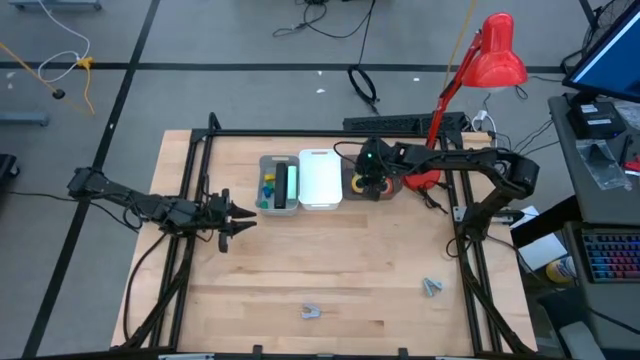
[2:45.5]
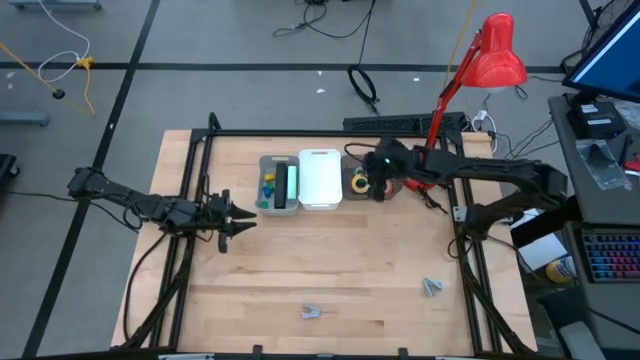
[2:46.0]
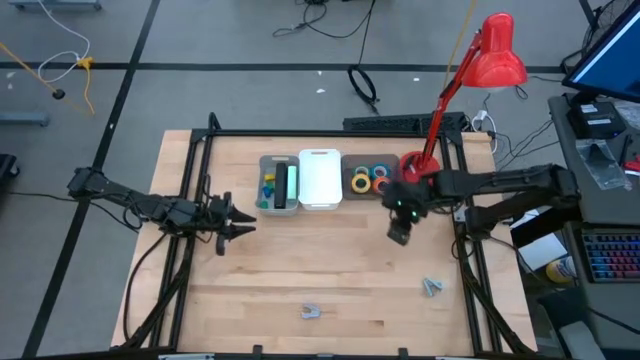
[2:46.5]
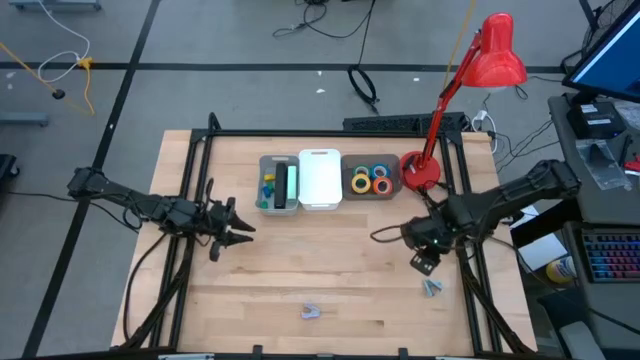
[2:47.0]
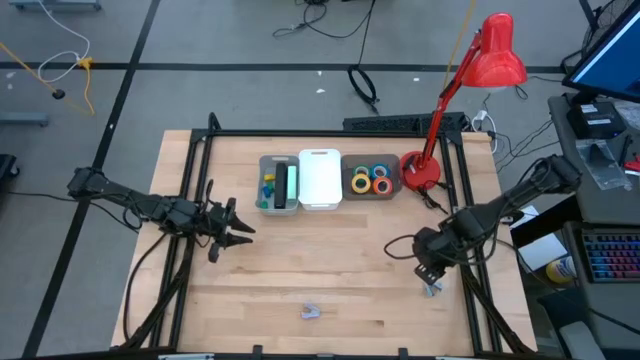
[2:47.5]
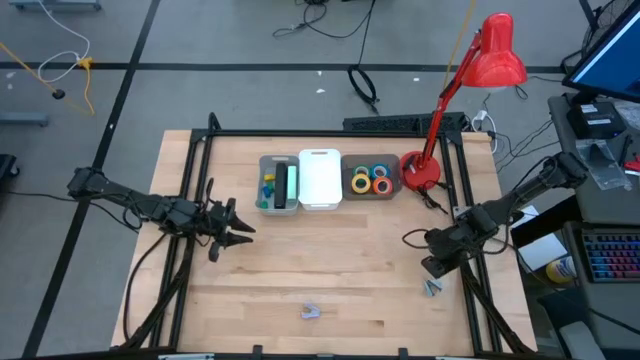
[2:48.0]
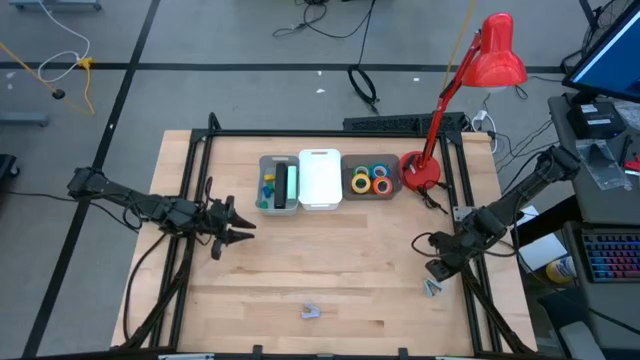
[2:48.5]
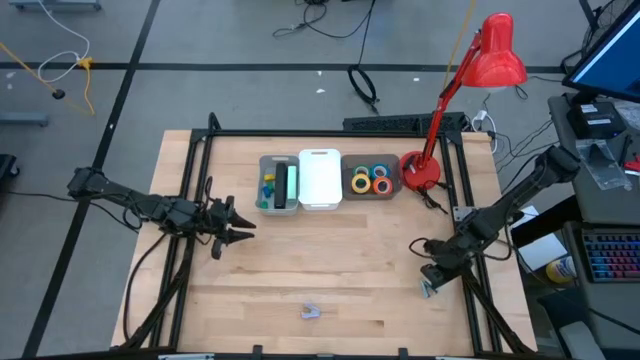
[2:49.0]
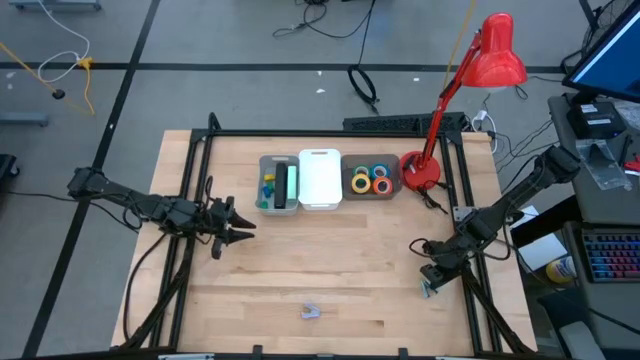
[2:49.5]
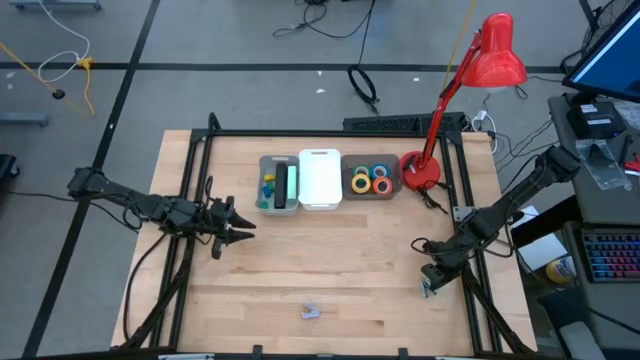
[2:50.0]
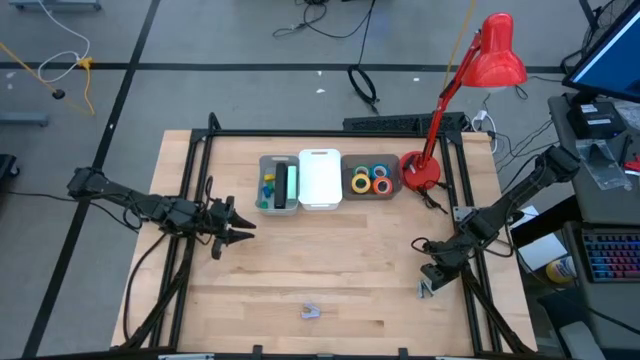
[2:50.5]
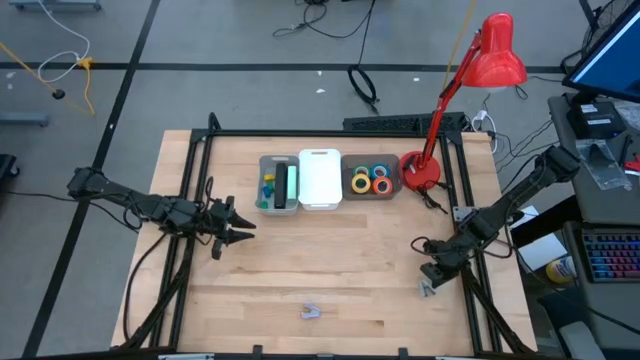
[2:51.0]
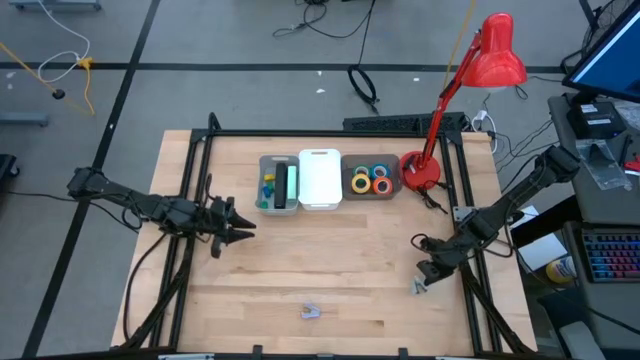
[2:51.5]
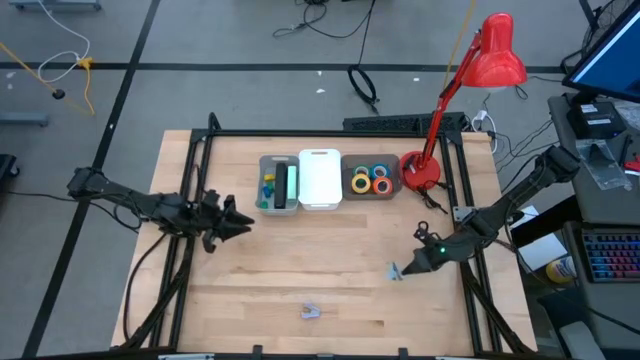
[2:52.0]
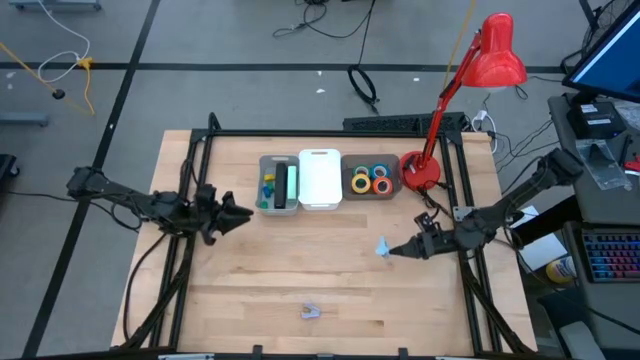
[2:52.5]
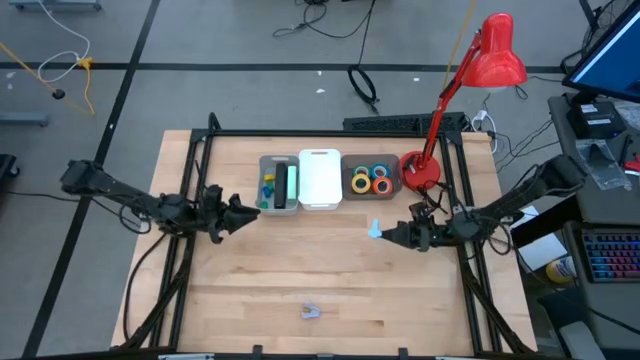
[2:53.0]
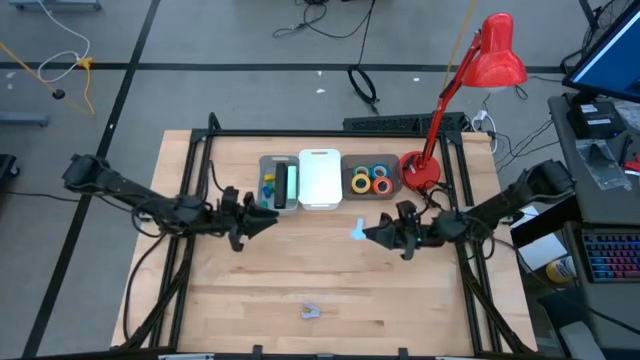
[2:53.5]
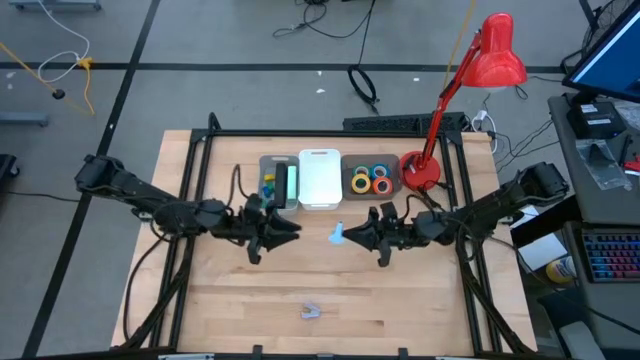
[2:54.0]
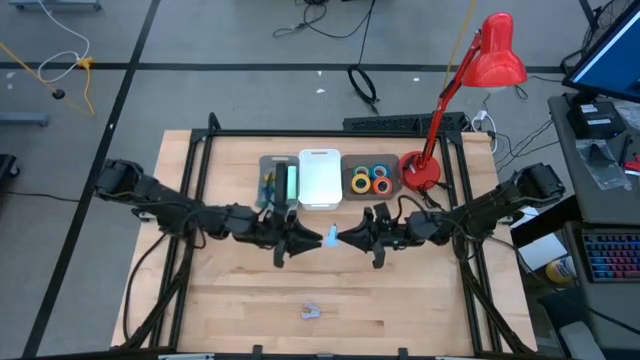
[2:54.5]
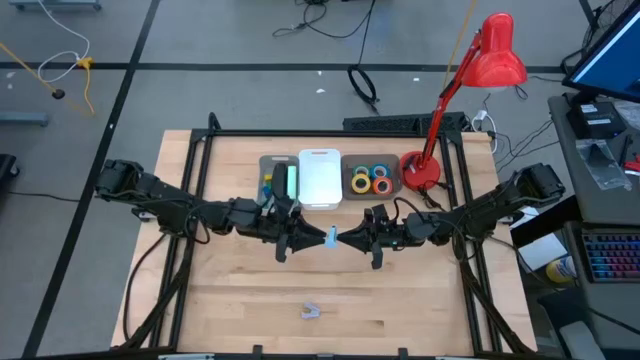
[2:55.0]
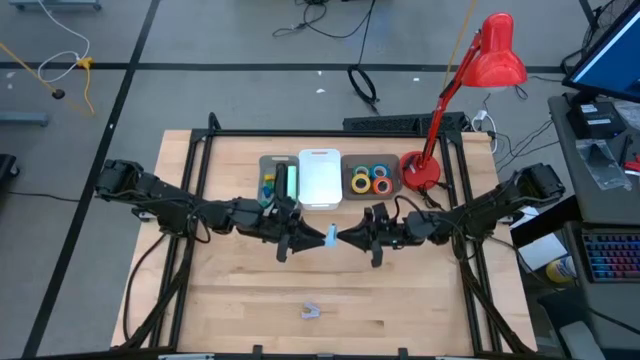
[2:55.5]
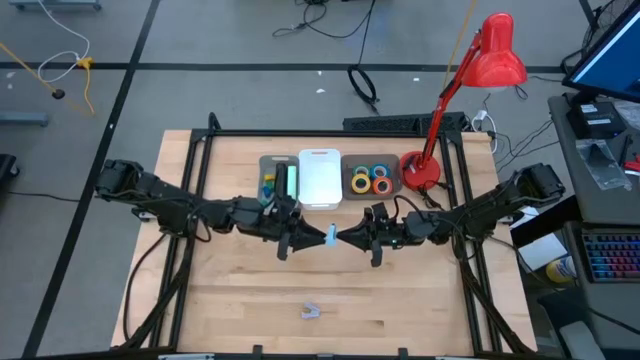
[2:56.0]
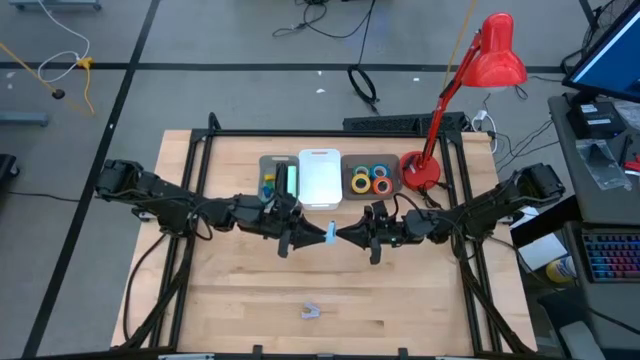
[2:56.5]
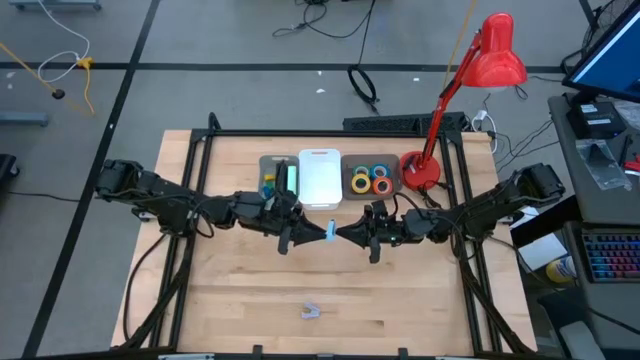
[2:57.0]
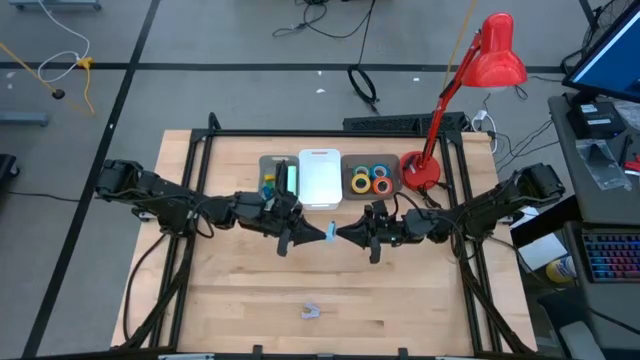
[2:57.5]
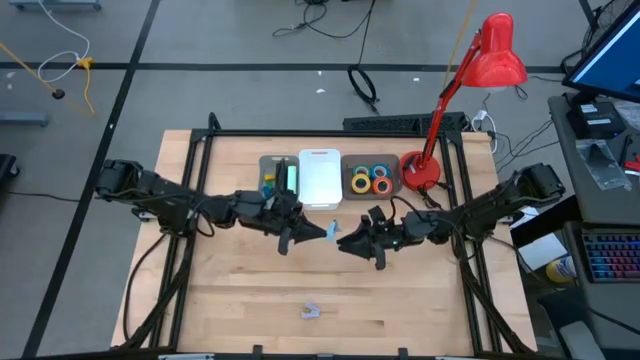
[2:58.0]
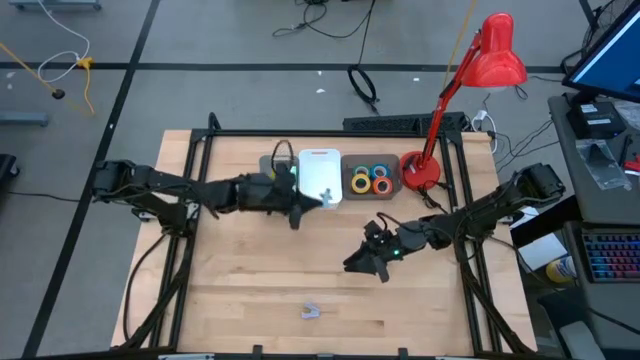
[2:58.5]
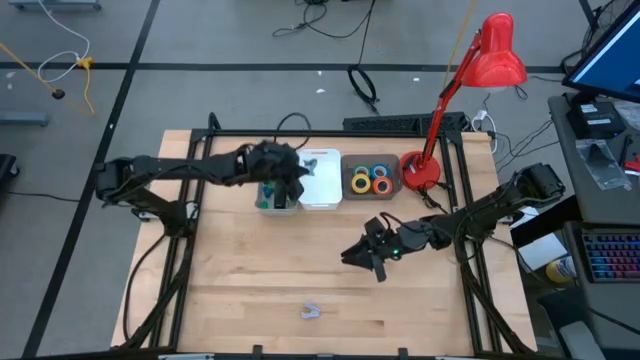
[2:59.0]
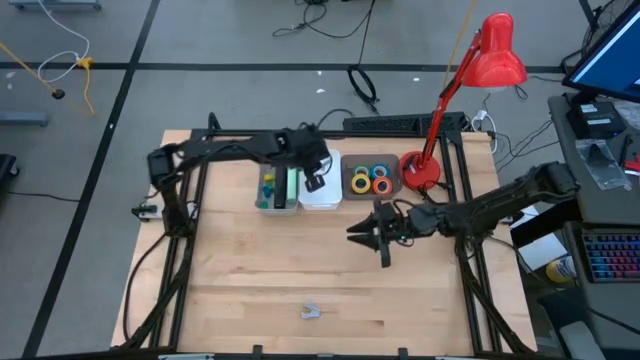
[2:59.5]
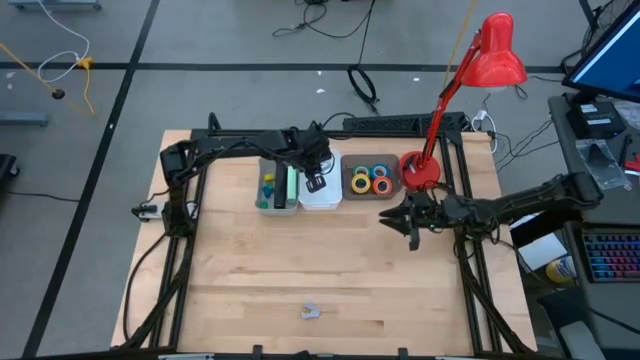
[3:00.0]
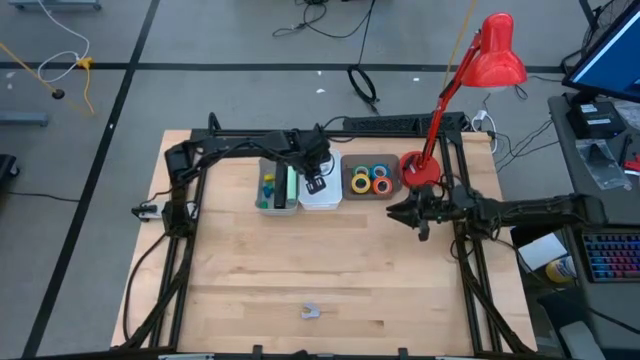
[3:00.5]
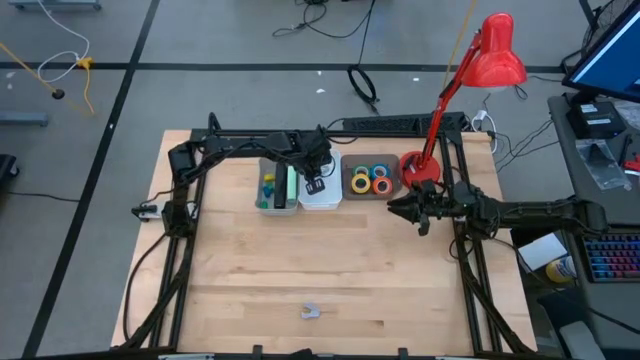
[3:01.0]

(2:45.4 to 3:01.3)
Task: Pick and place Stapler, Stapler remover, tape
Put the light blue staple remover into the white bin

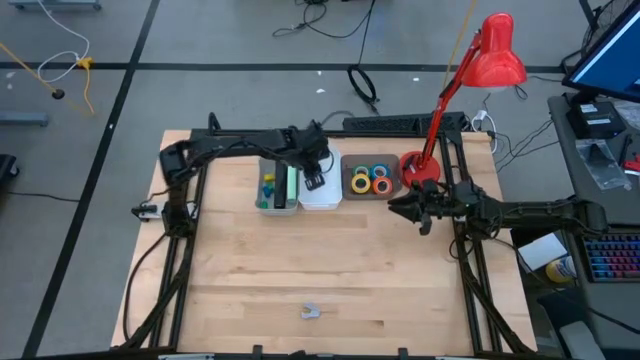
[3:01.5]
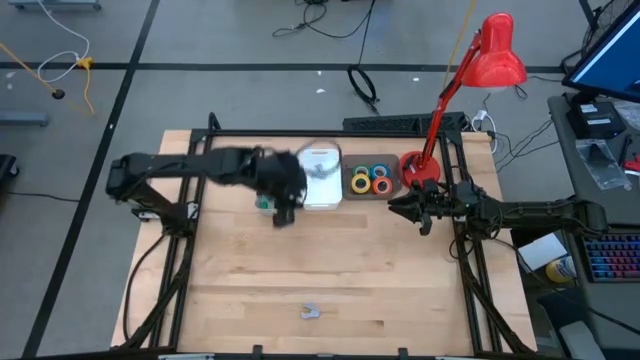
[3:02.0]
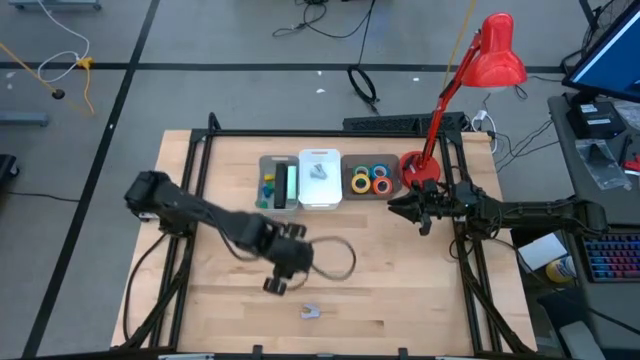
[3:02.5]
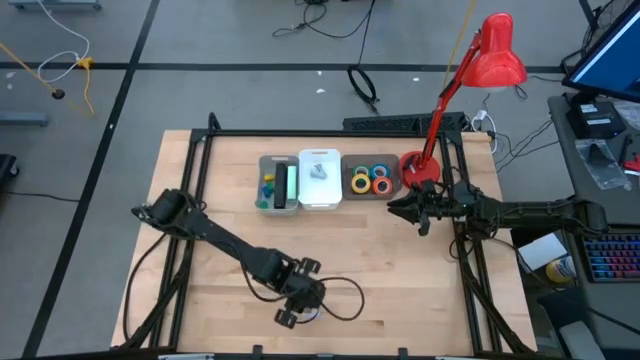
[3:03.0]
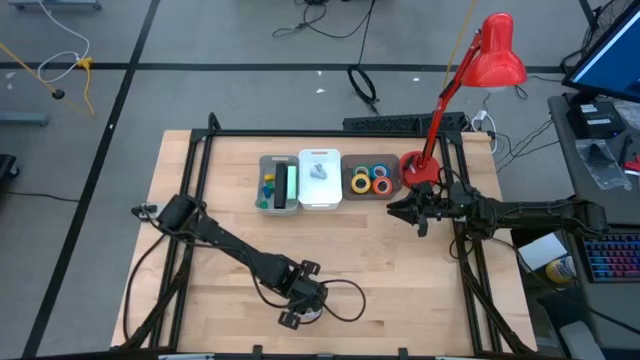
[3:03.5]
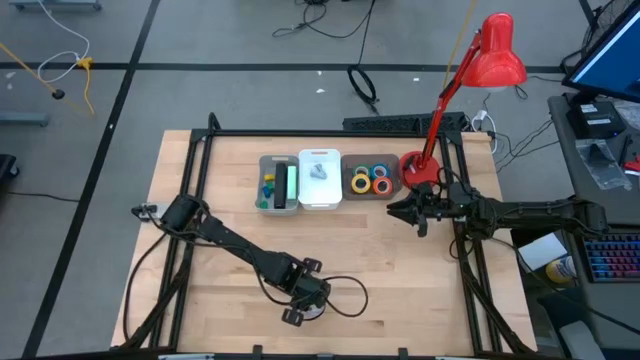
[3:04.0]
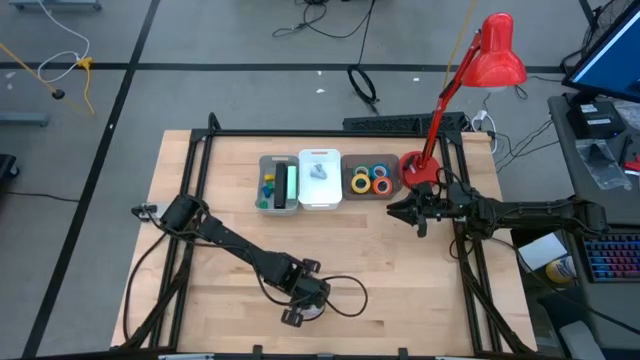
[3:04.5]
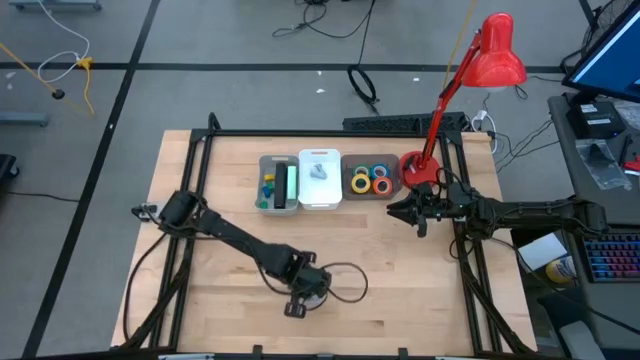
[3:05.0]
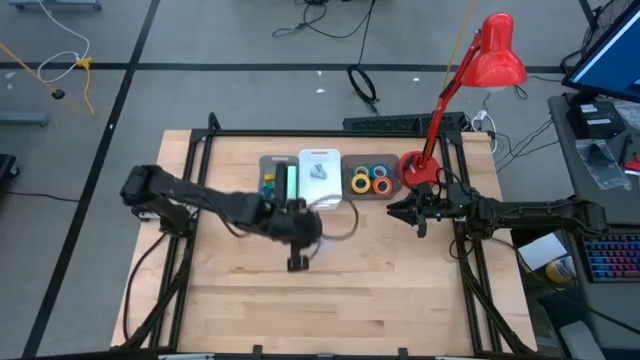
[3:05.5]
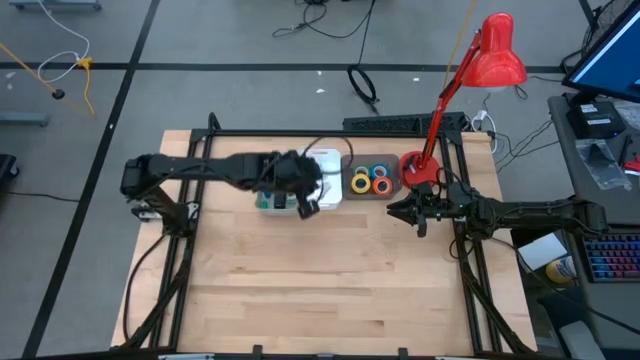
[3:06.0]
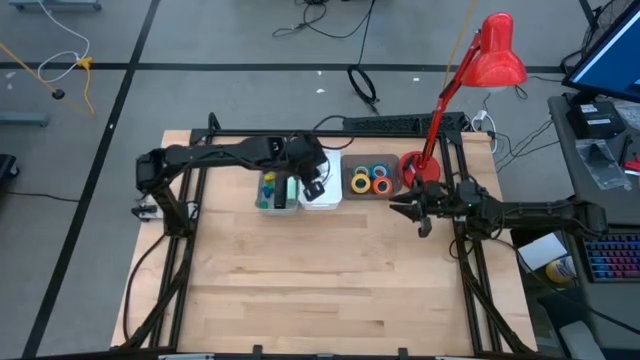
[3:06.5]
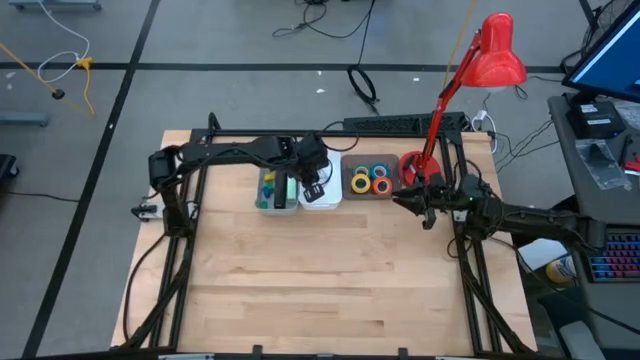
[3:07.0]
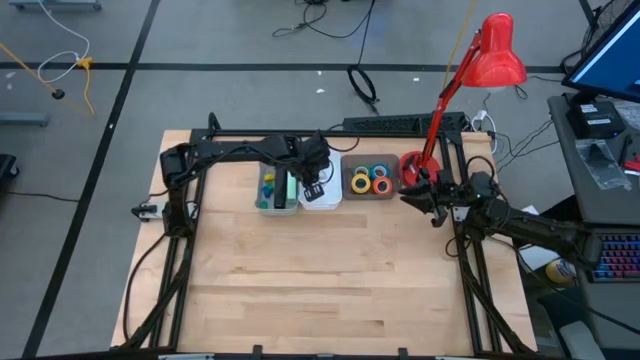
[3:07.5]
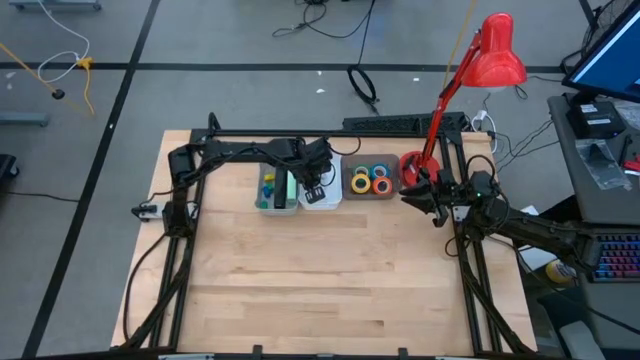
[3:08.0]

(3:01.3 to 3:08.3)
Put the pink staple remover into the white bin
